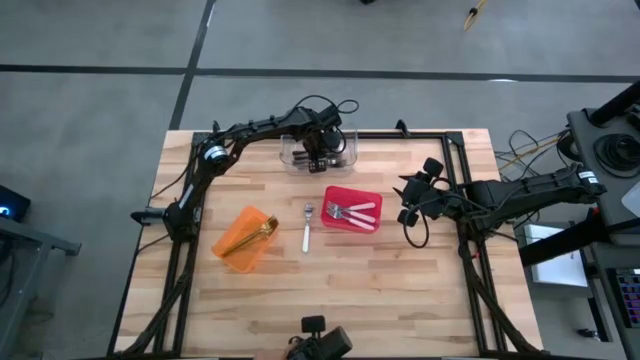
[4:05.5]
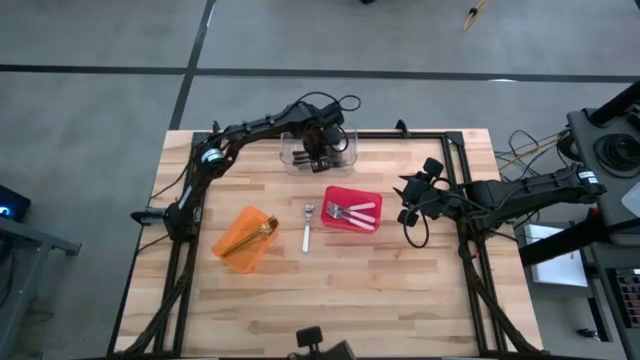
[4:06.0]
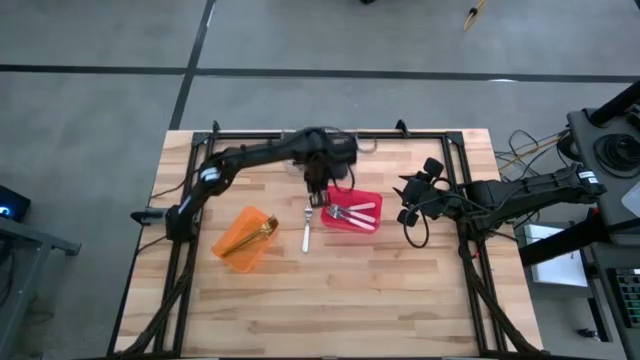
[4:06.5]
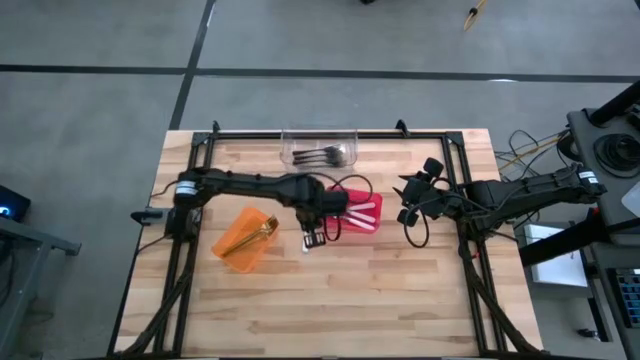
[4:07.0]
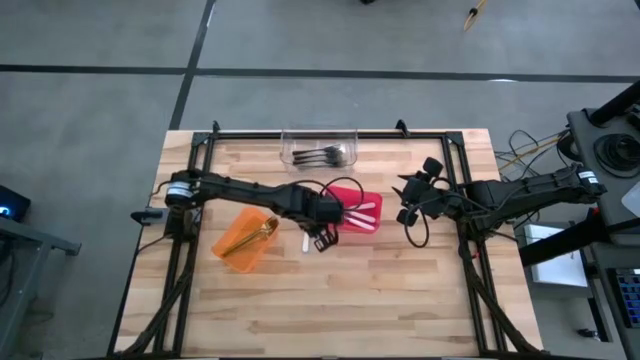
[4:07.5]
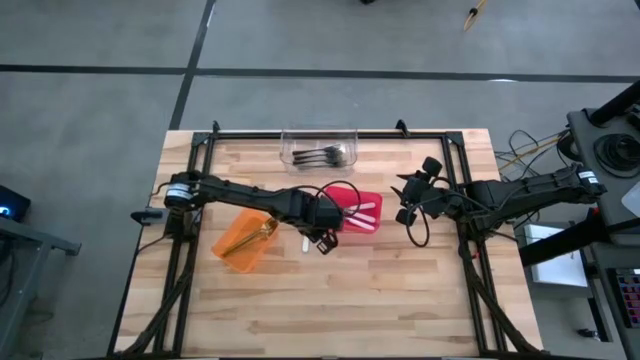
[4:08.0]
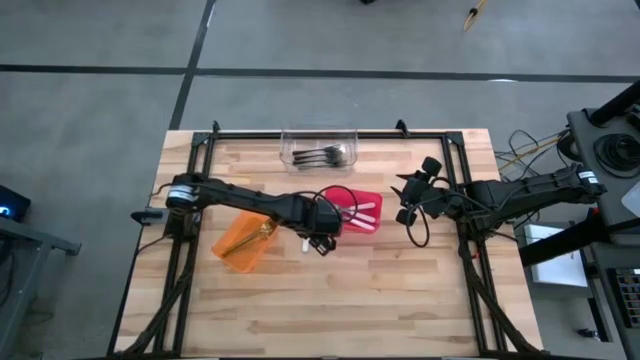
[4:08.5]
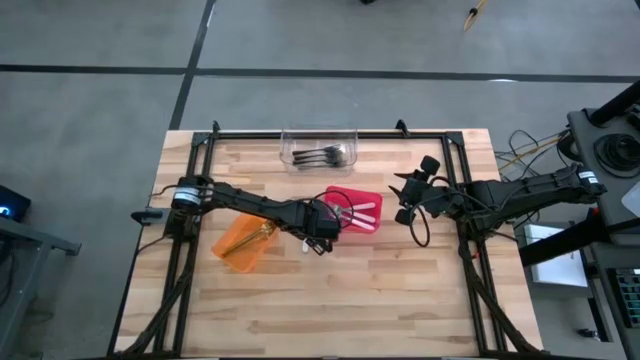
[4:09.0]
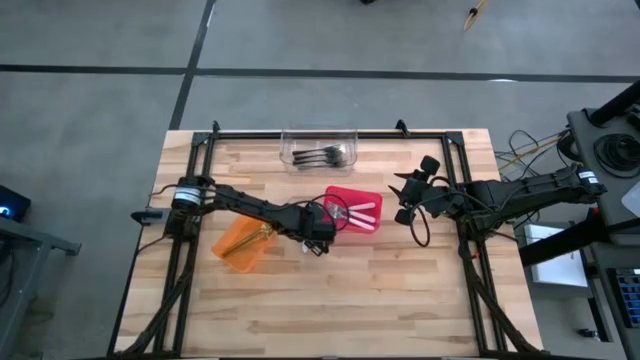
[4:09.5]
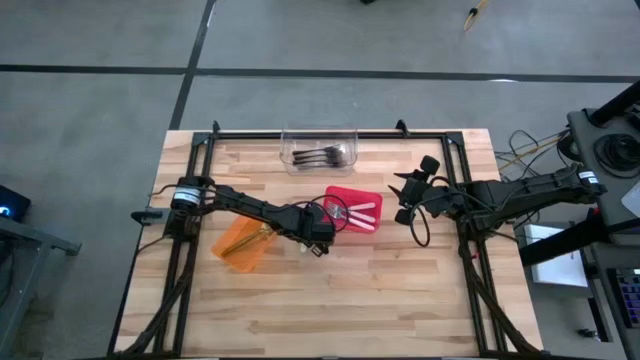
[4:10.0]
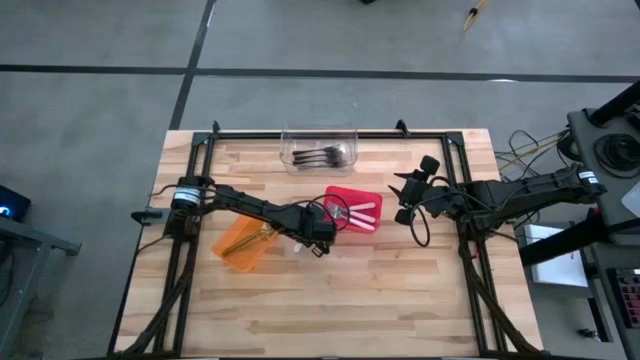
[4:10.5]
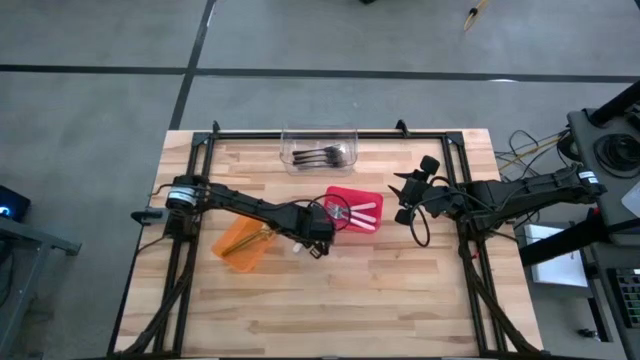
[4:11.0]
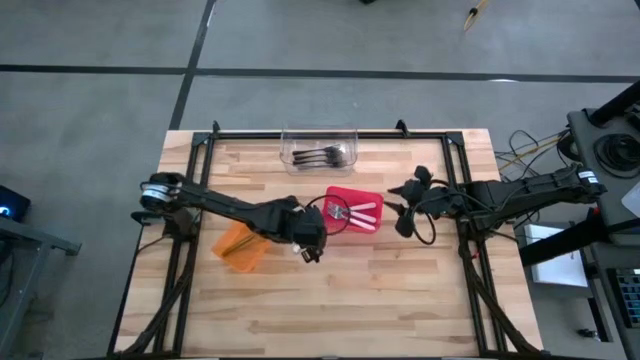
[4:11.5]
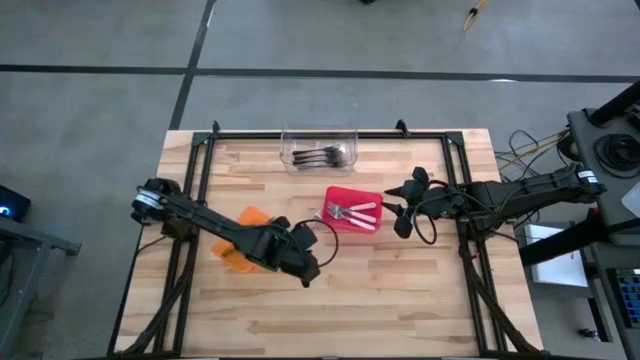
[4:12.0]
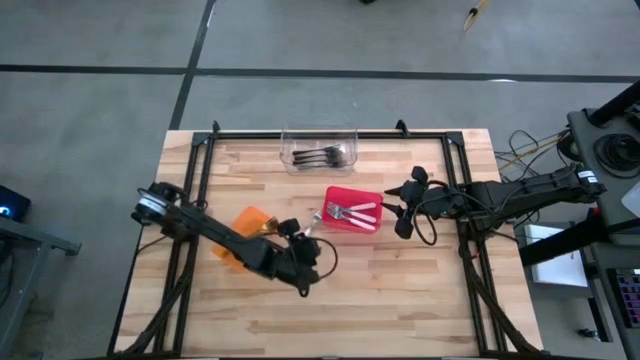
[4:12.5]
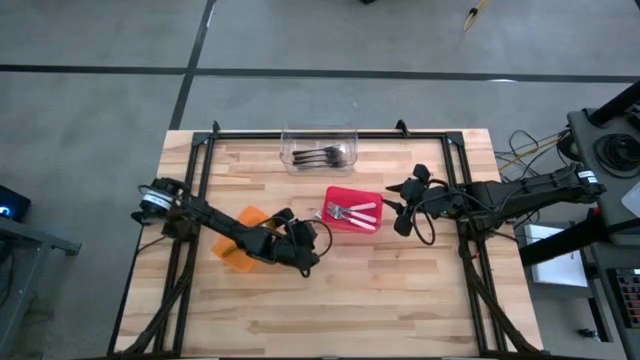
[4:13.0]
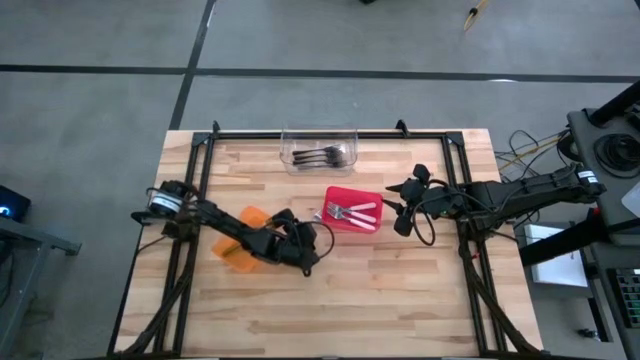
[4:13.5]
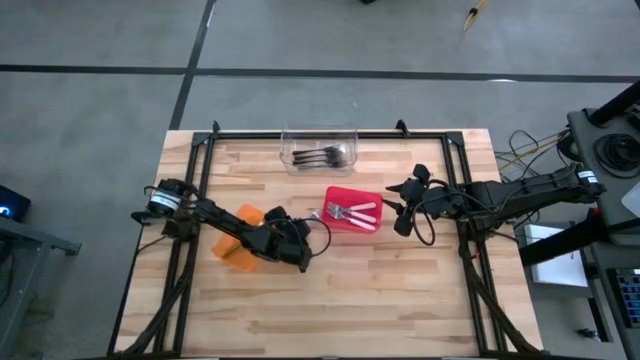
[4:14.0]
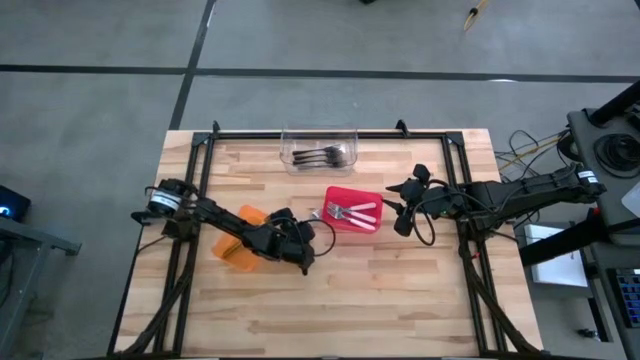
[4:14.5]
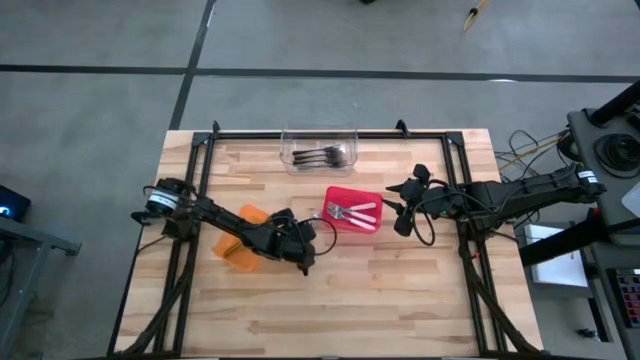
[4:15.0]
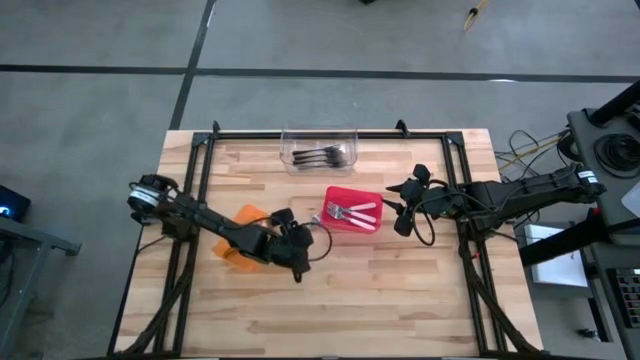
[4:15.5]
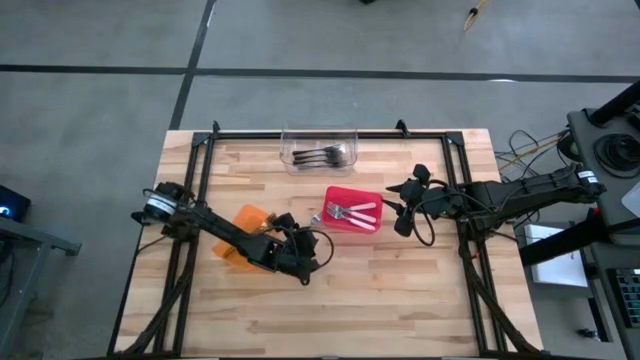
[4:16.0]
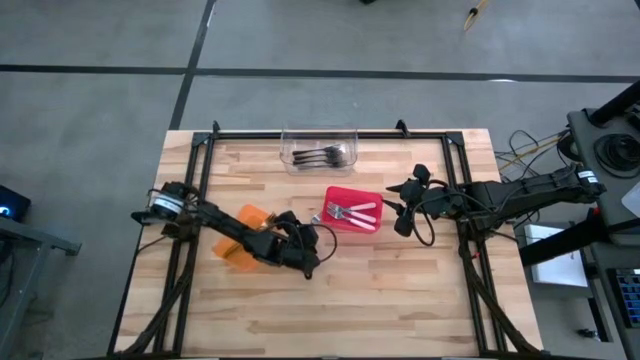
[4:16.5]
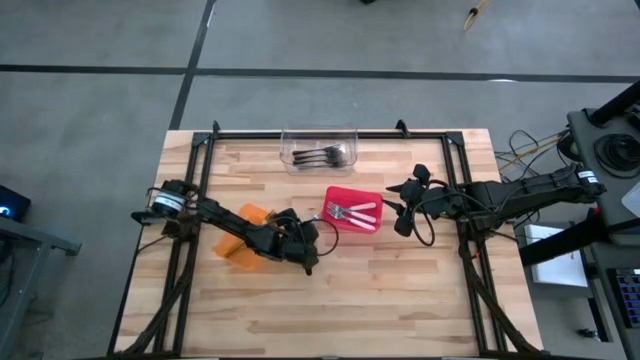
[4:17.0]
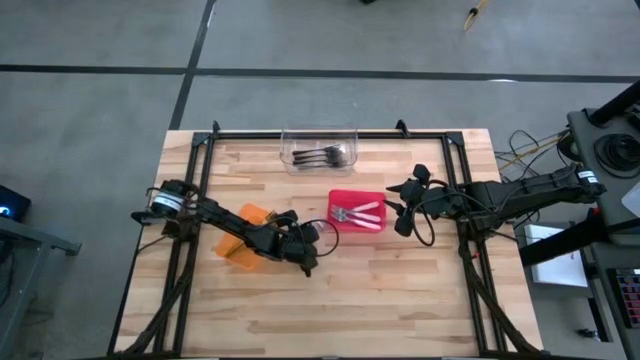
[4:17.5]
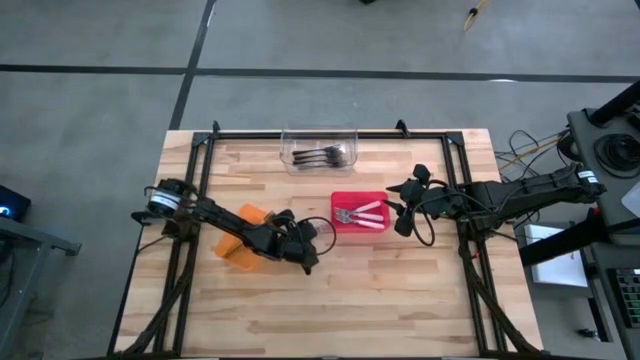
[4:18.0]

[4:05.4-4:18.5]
Task: Sort silverware by color (type)
Put the white fork into the red bin

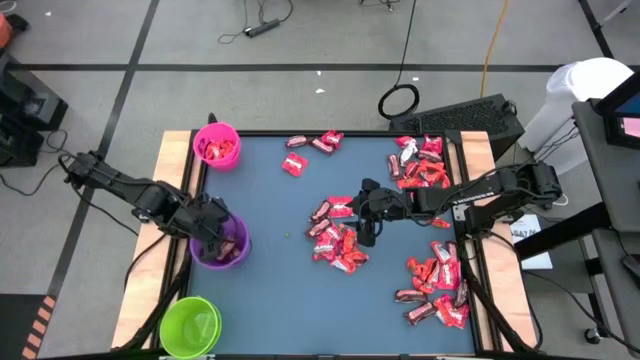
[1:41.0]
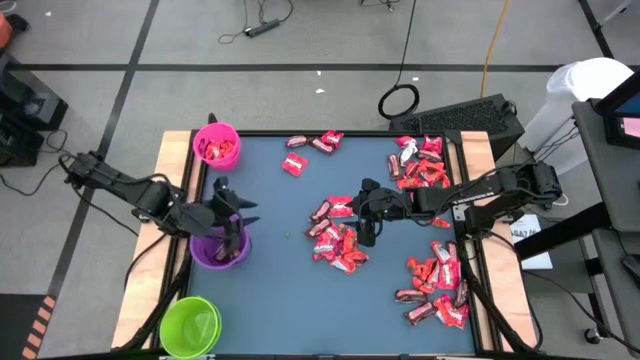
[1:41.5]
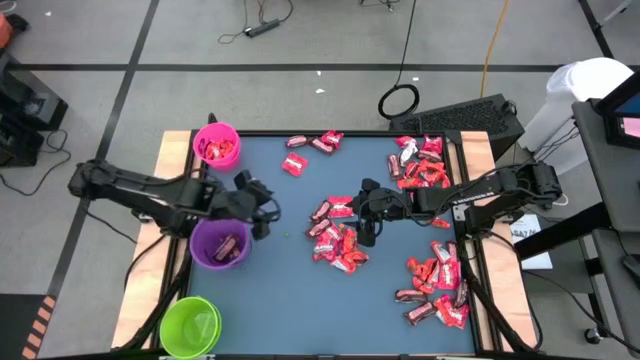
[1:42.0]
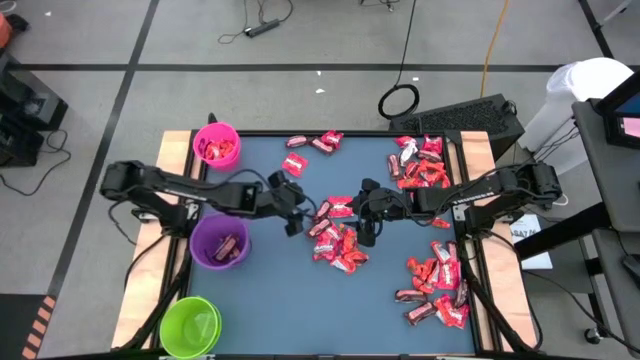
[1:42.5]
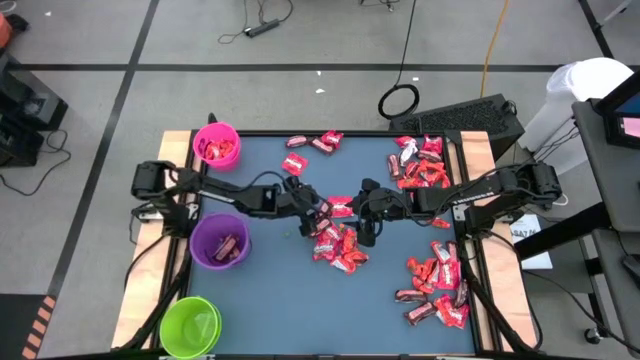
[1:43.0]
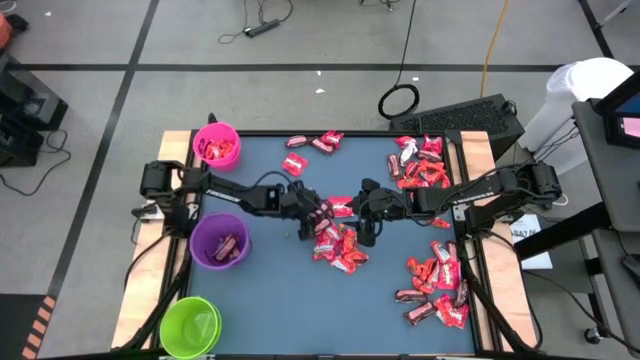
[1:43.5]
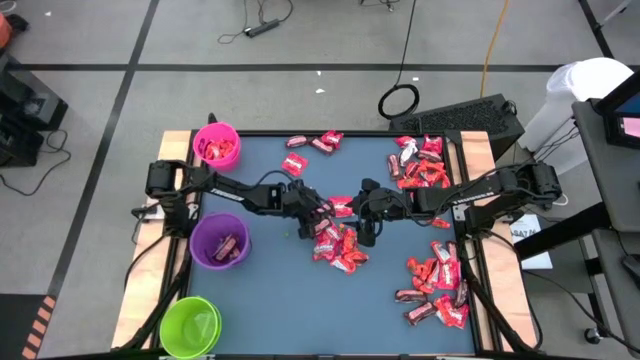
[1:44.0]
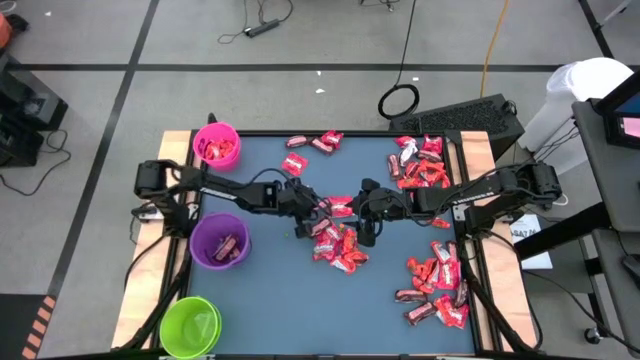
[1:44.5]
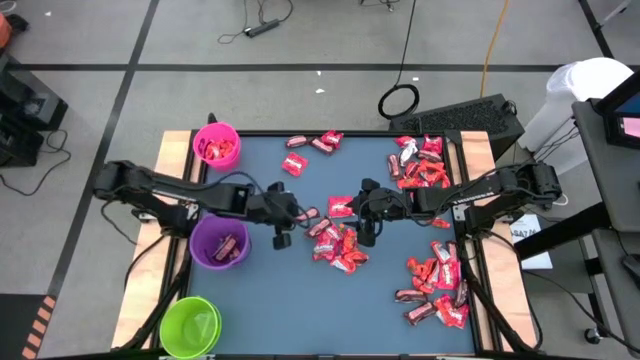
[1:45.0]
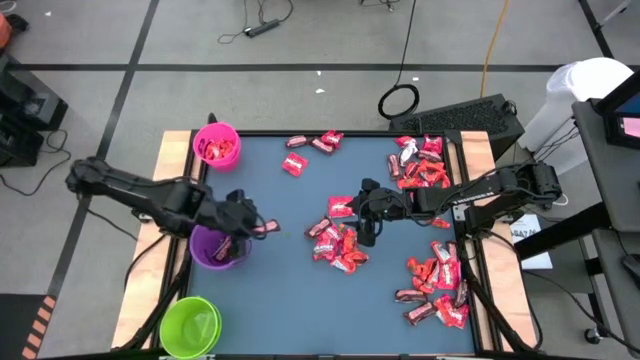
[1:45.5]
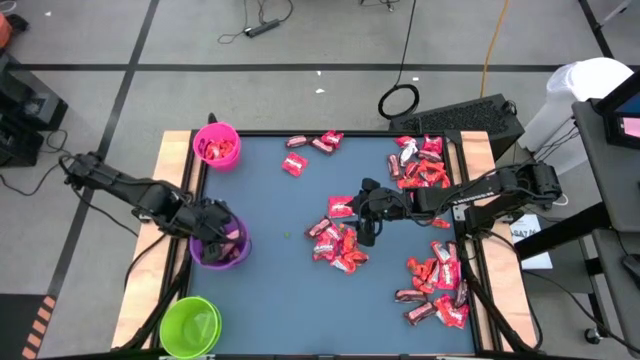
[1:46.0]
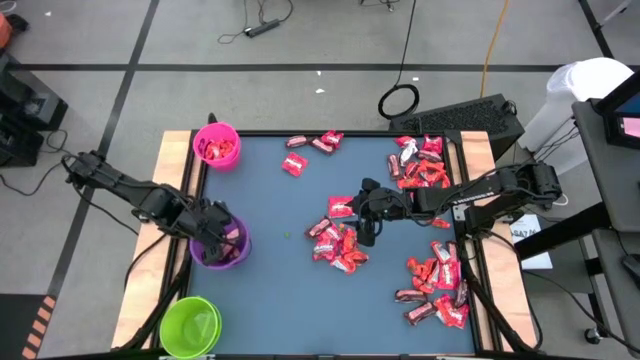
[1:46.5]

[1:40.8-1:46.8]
Task: Organize candy in baskets
Put the brown chocolate into the violet bucket

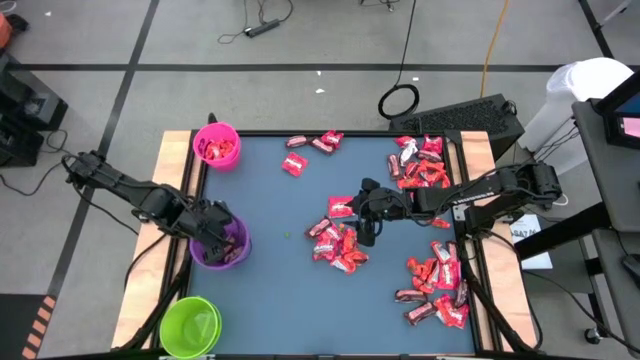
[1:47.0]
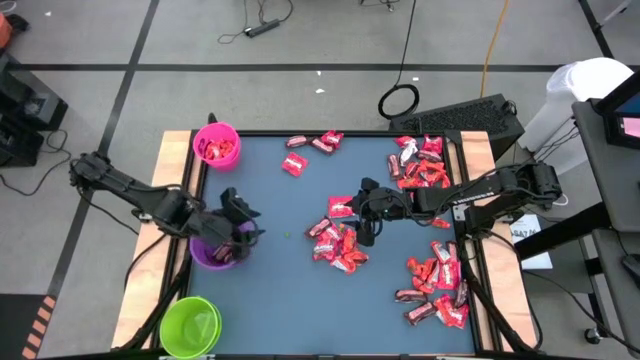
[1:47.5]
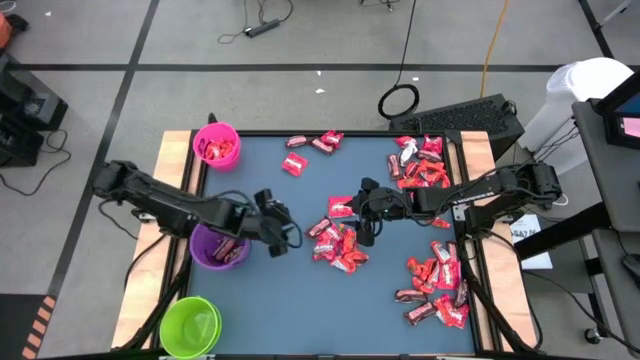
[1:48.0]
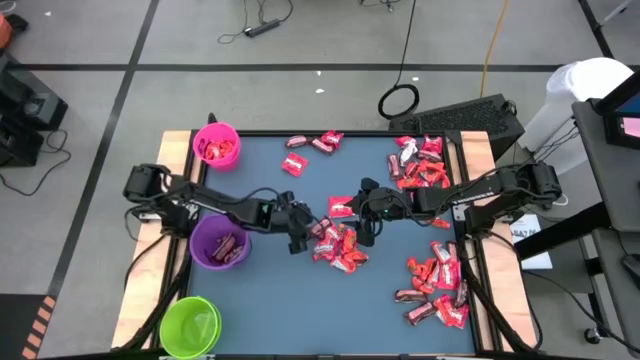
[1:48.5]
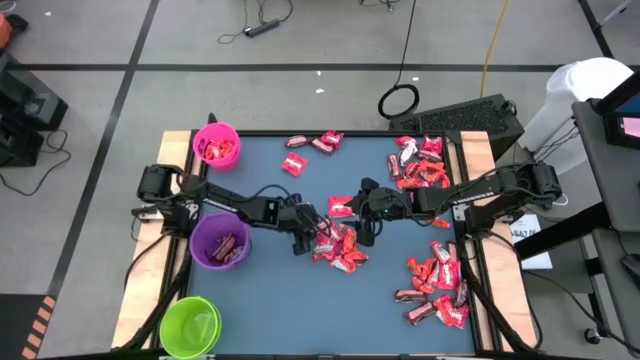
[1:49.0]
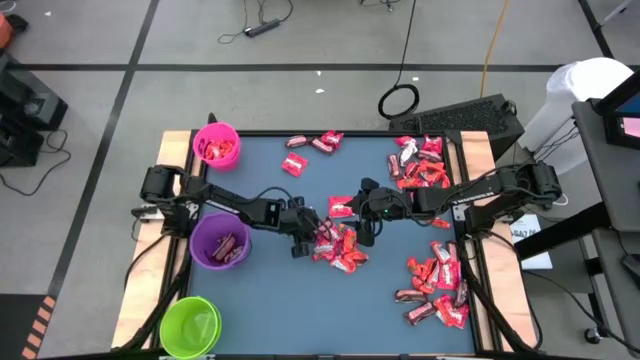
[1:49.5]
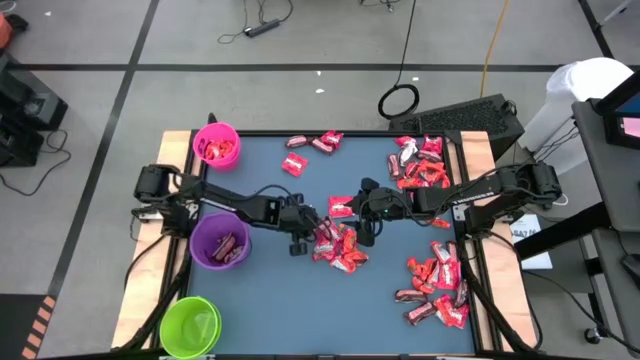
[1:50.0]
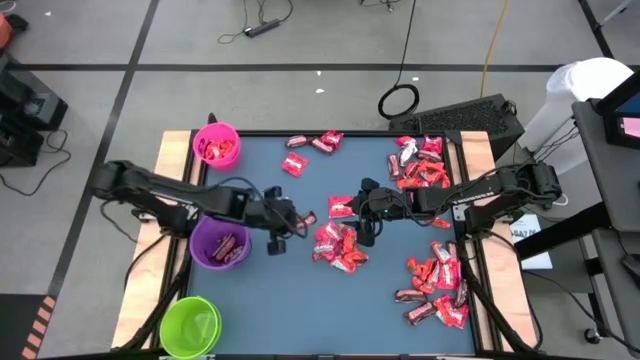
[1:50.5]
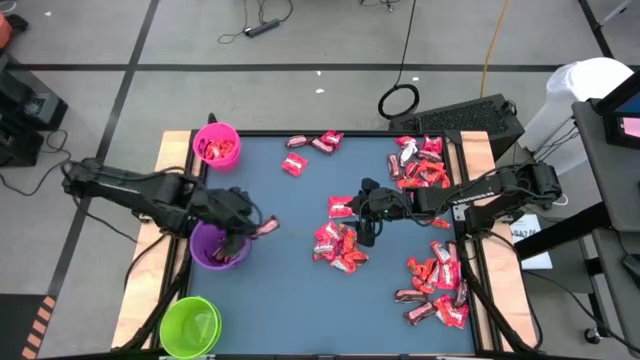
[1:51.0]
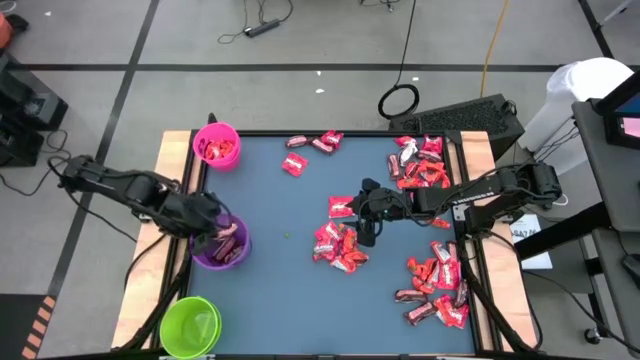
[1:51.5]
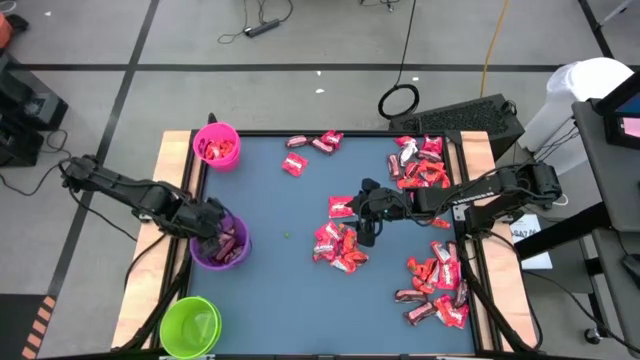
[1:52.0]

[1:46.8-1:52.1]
Put the brown chocolate into the violet bucket
